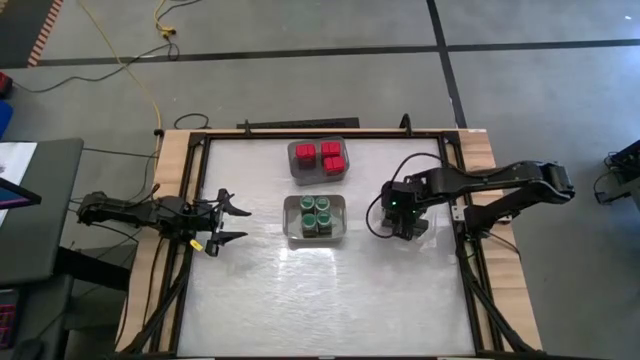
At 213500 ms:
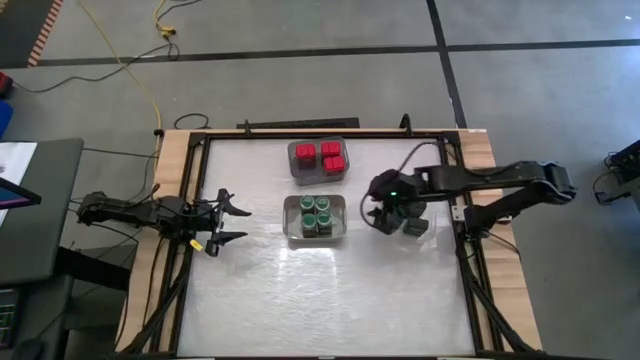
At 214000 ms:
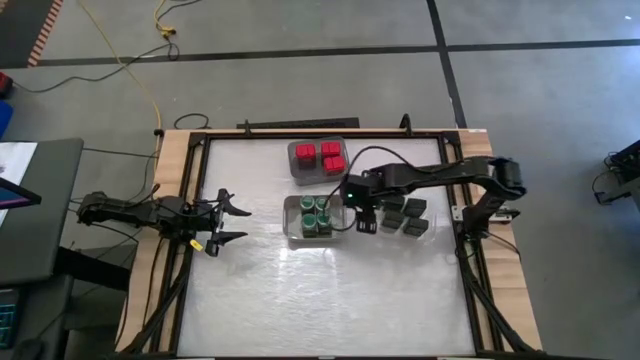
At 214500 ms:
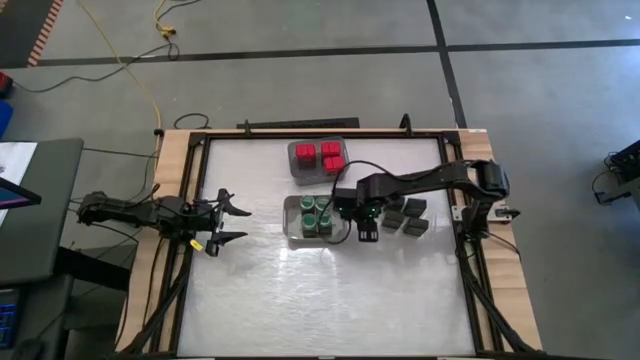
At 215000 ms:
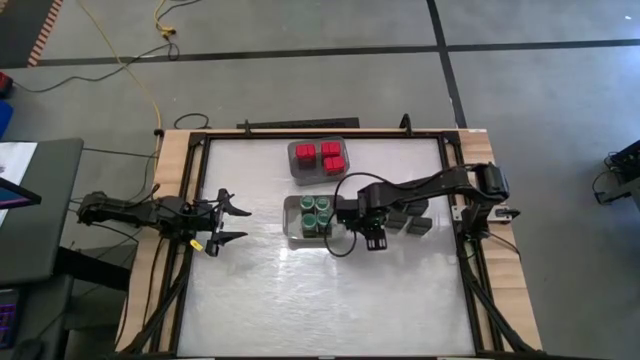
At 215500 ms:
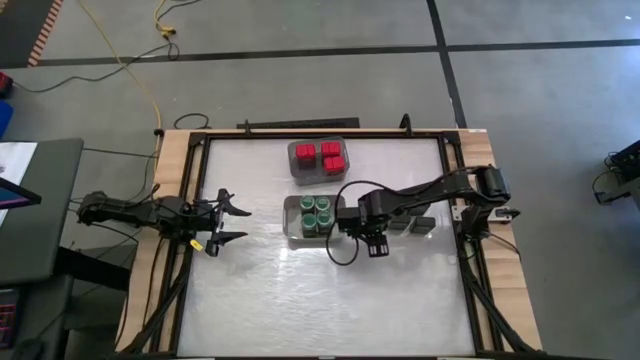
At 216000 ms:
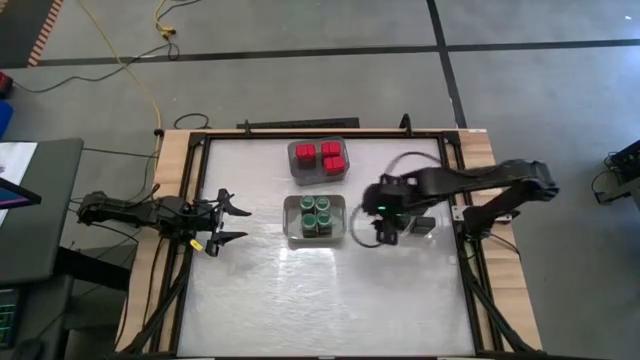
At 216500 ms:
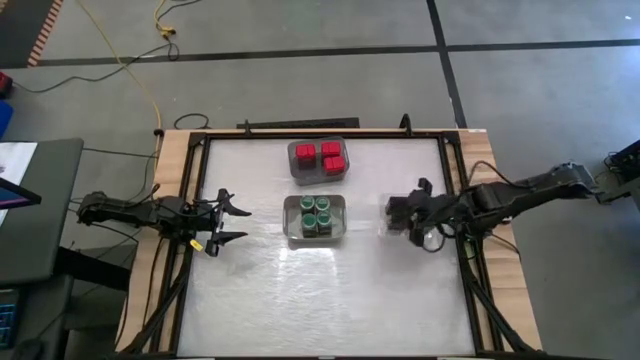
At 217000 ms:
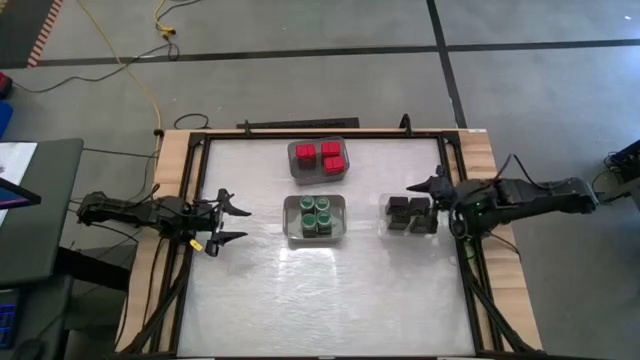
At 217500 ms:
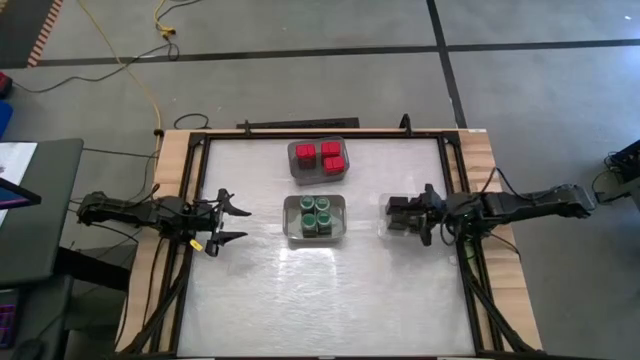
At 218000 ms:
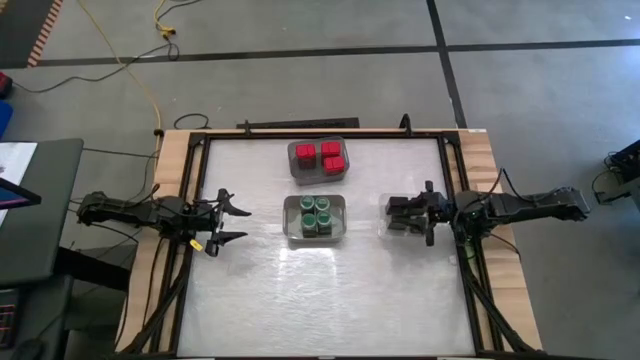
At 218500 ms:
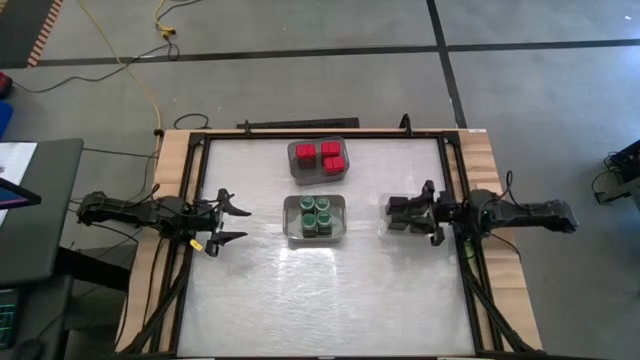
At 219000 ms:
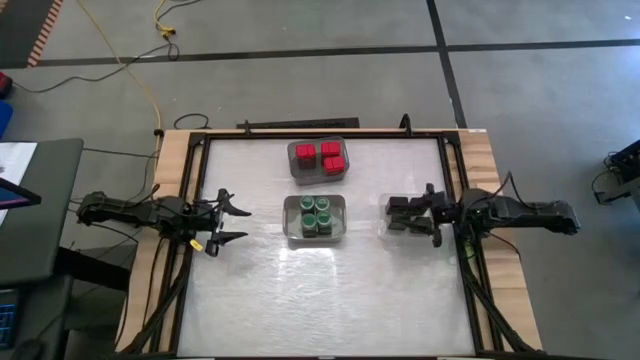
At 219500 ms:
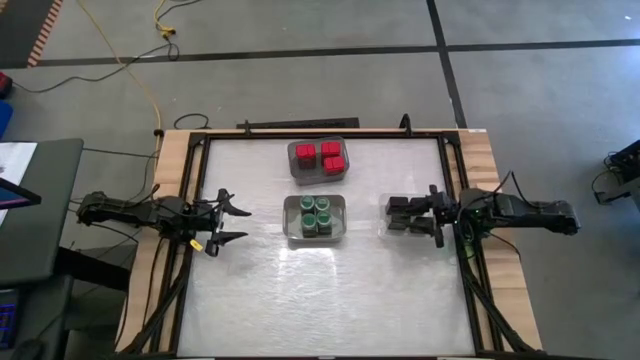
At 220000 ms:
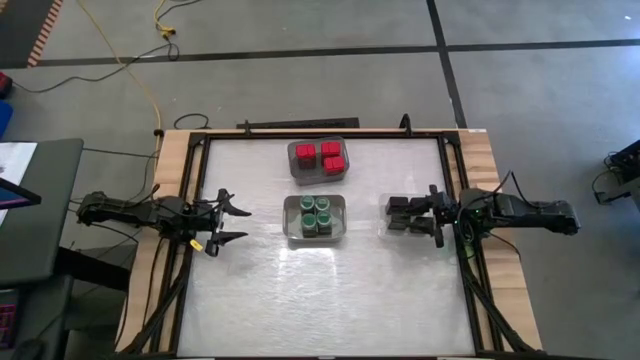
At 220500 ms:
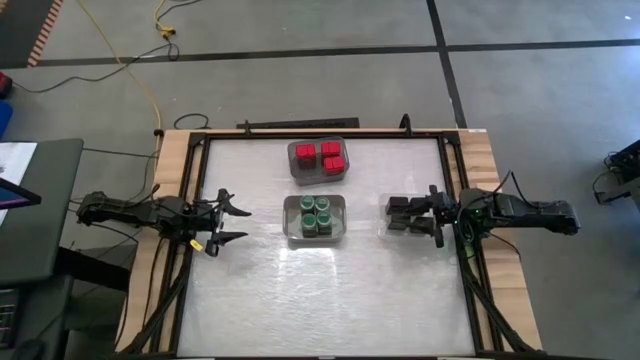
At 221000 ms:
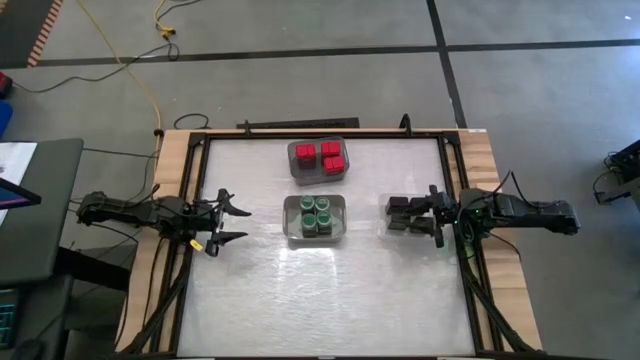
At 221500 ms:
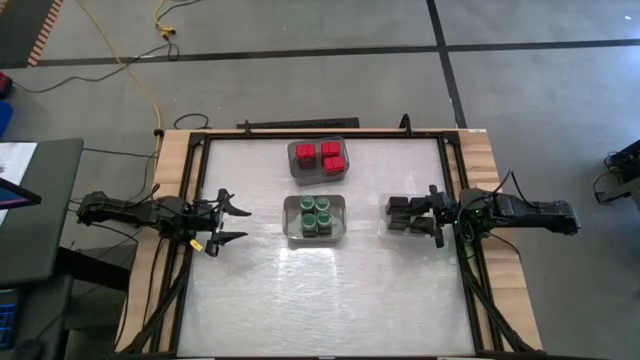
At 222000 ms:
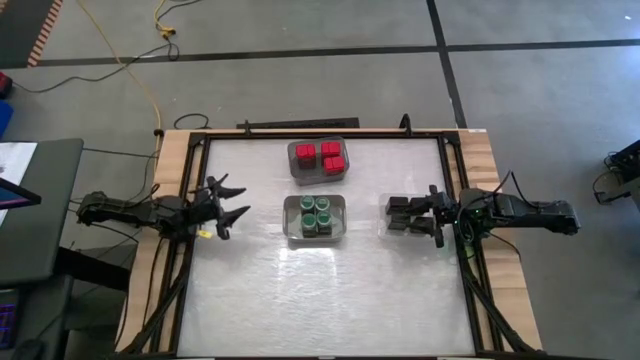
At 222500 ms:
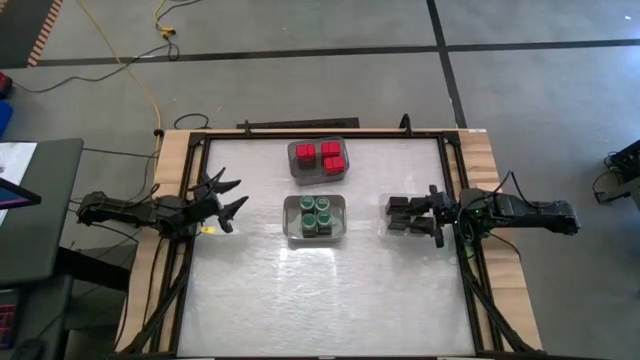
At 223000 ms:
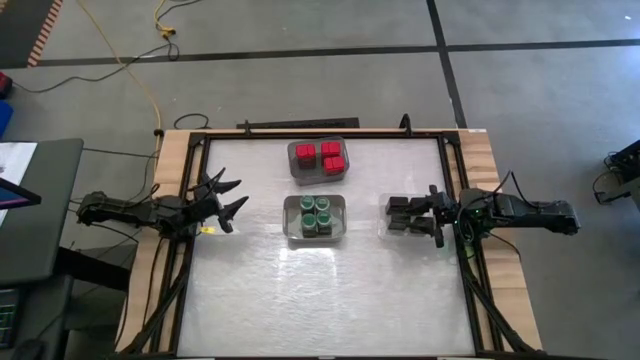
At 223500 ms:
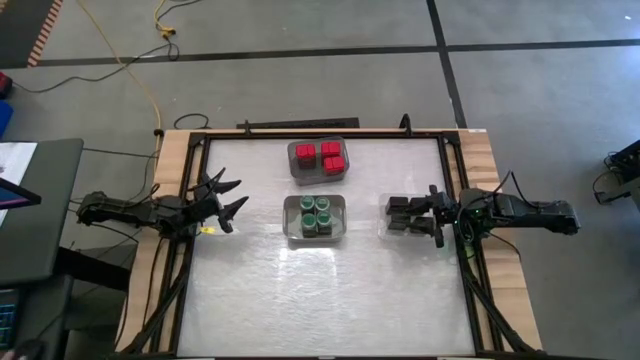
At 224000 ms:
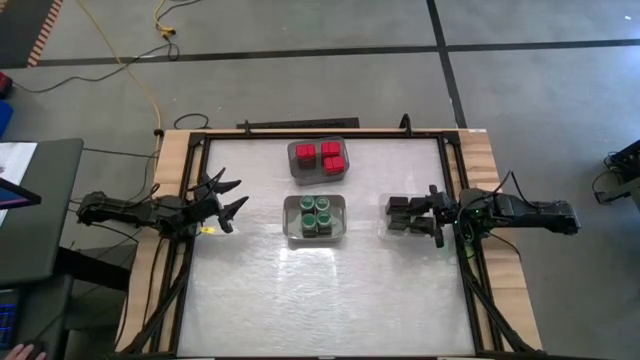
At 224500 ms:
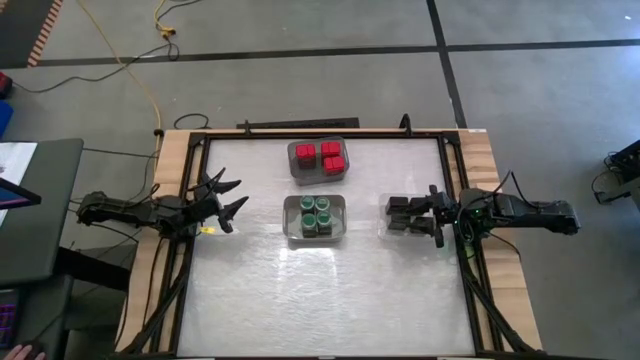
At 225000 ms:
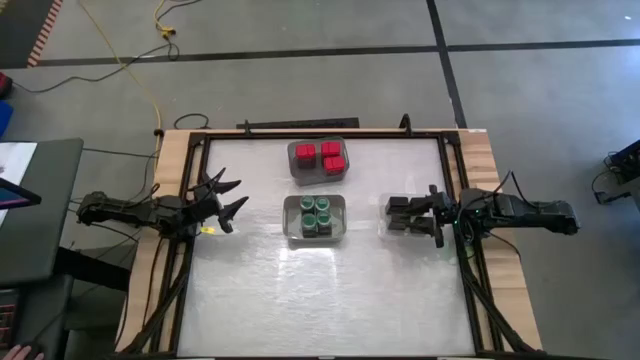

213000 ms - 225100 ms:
Task: Sort spices by type
Return to Home Position

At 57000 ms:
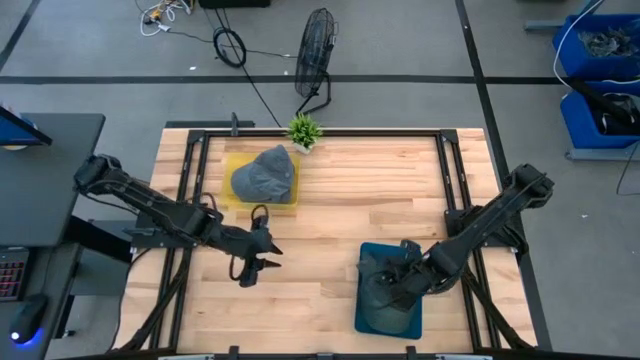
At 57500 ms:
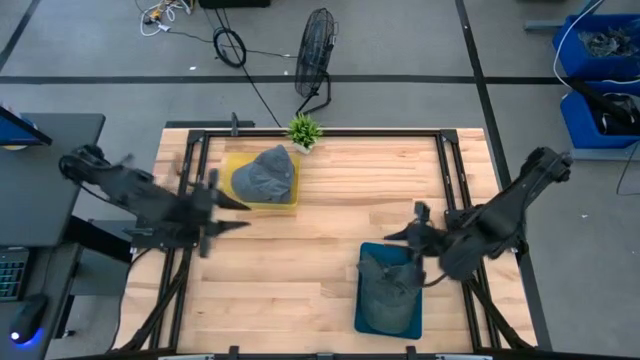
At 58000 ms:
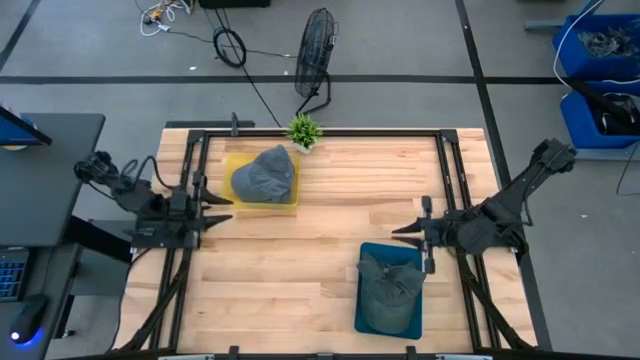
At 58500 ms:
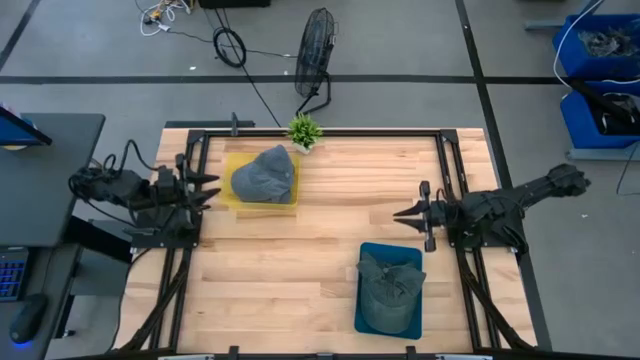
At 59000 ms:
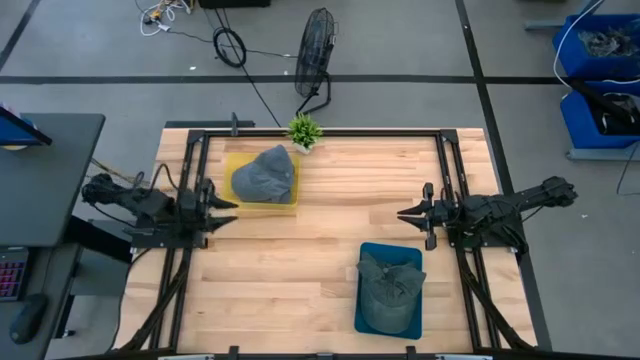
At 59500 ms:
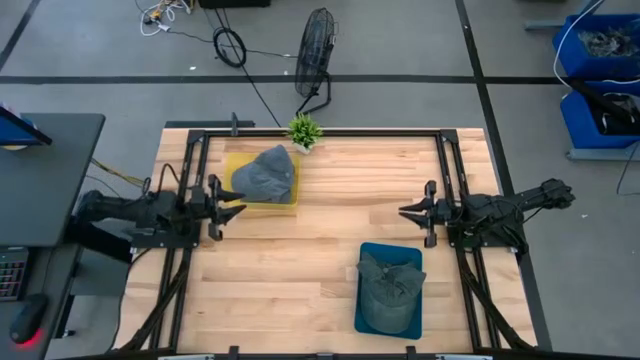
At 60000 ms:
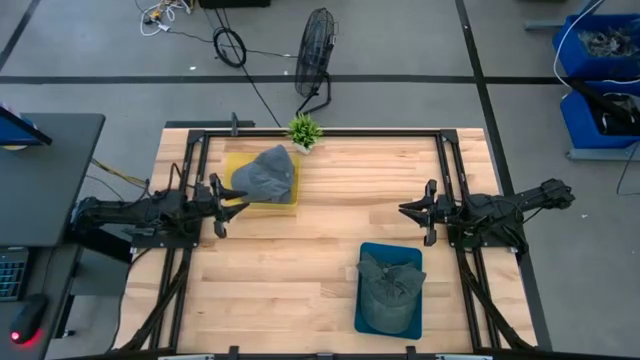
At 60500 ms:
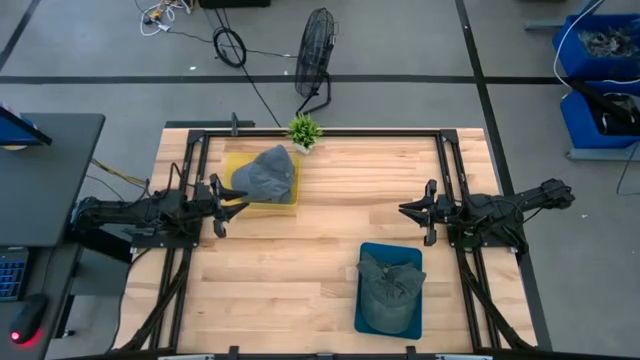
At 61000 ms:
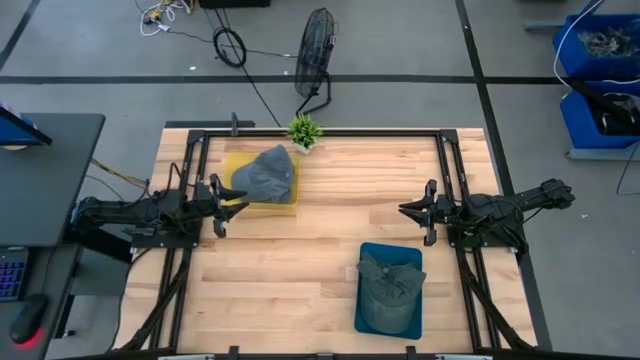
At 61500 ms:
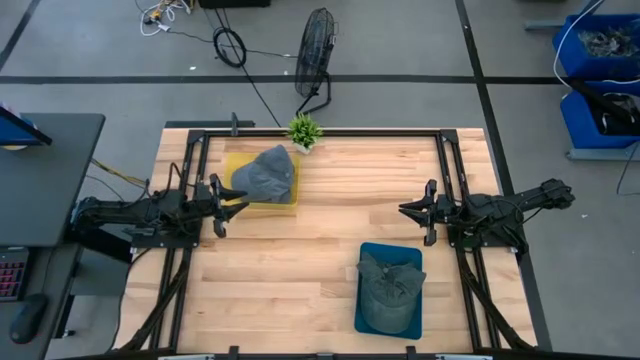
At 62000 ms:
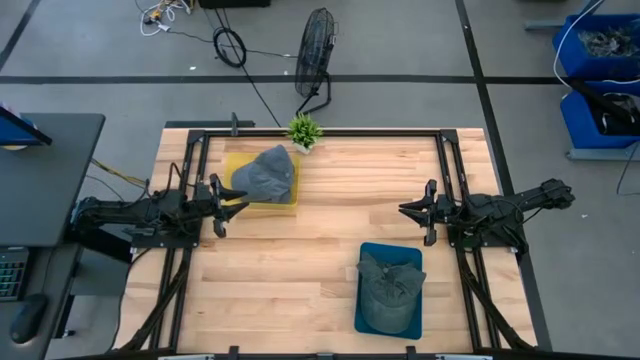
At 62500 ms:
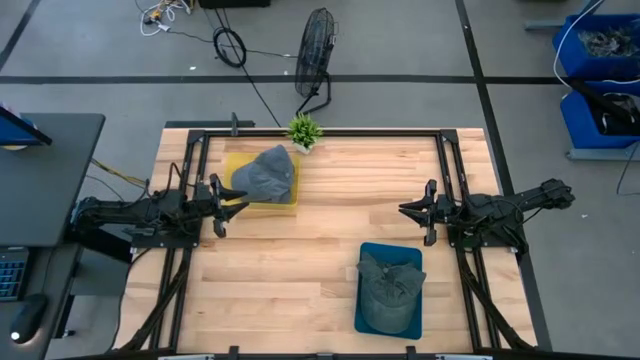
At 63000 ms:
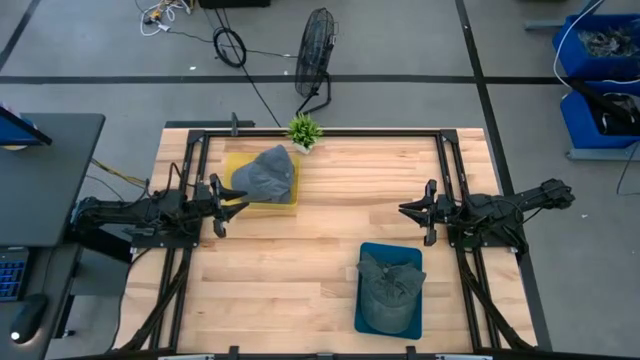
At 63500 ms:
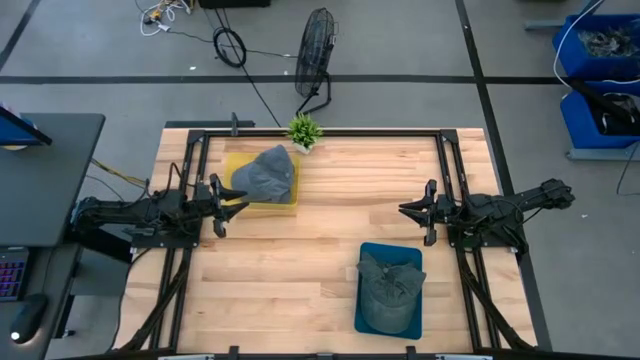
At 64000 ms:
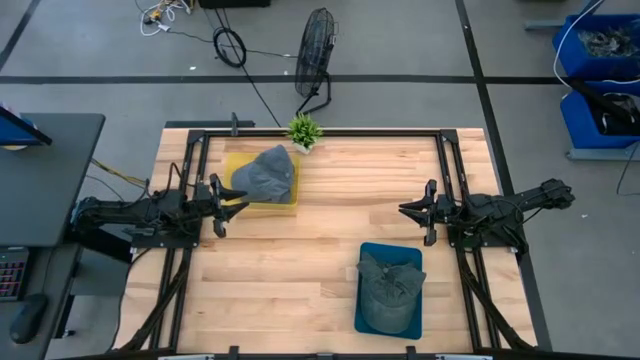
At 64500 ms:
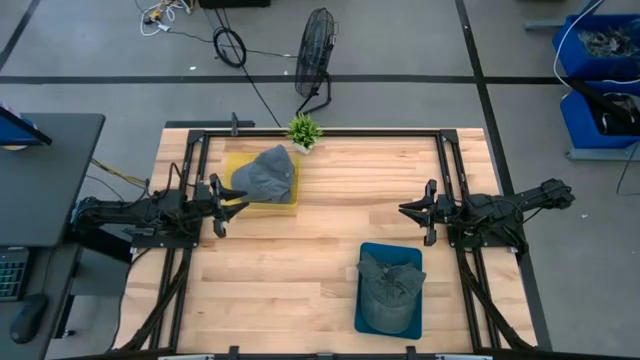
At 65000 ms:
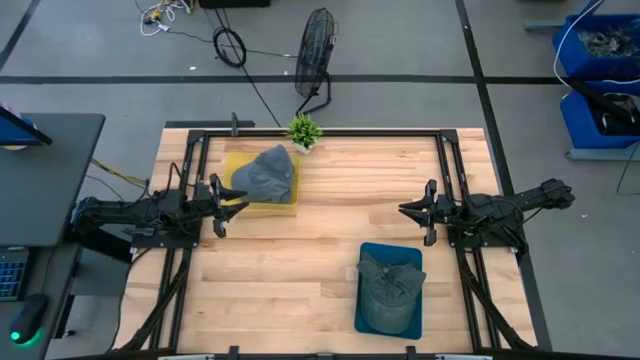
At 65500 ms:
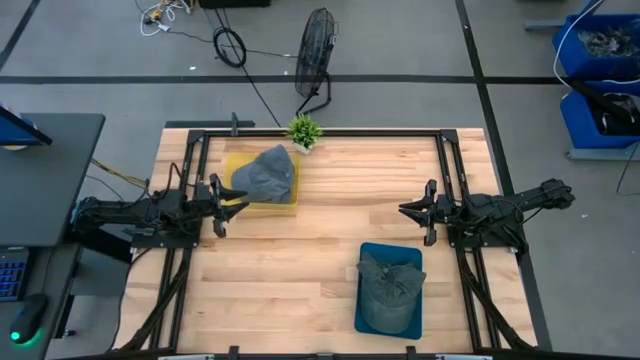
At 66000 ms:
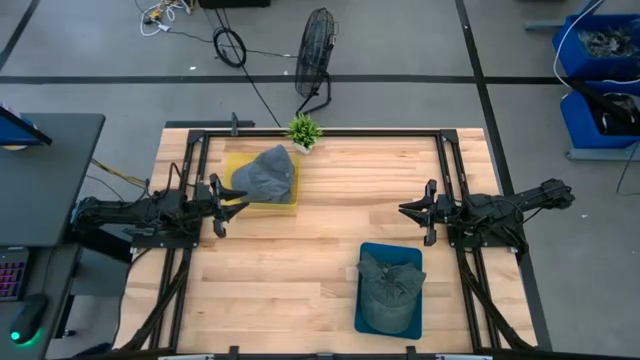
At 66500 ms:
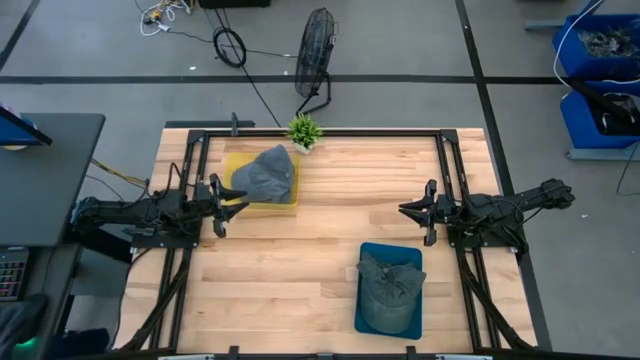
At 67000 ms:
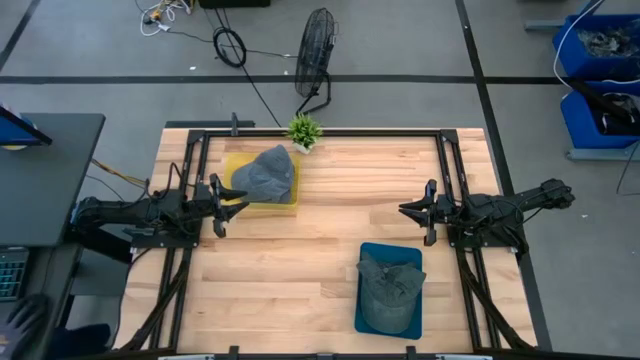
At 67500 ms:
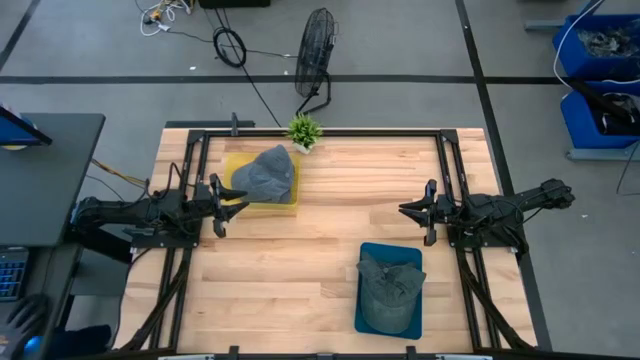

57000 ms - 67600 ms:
Task: Pick & Place hat
Return to Home Position
